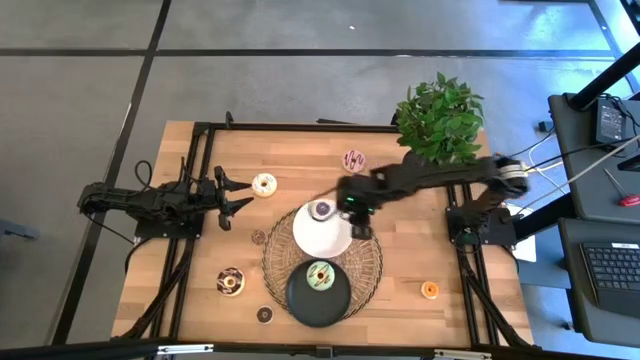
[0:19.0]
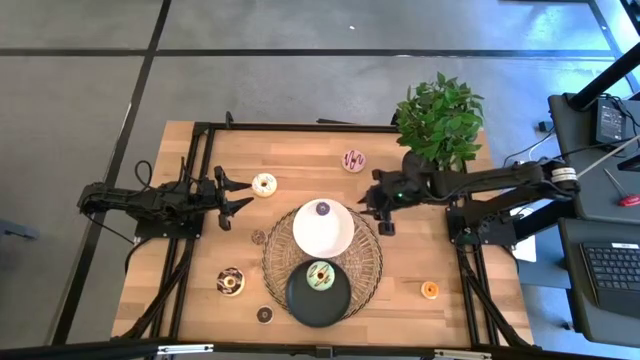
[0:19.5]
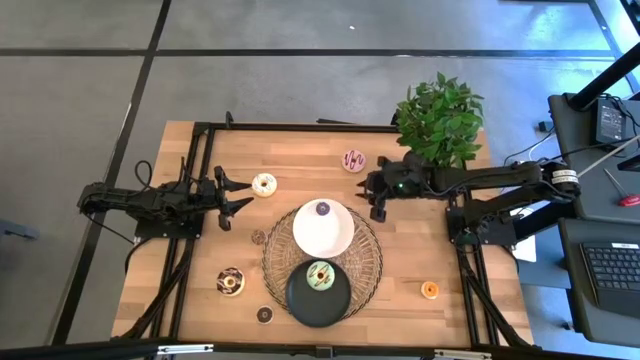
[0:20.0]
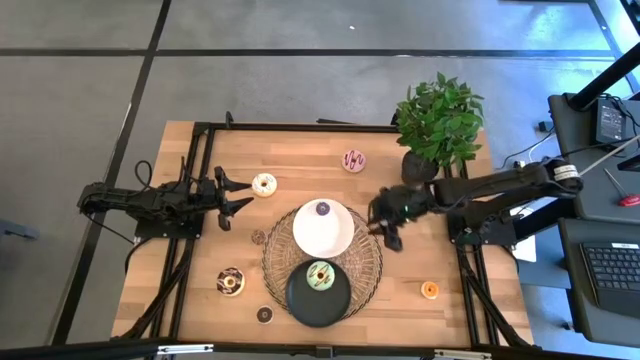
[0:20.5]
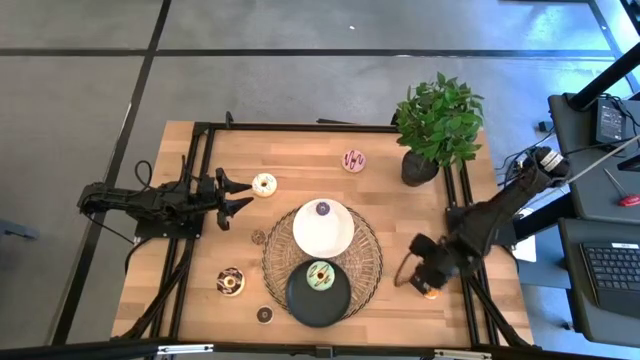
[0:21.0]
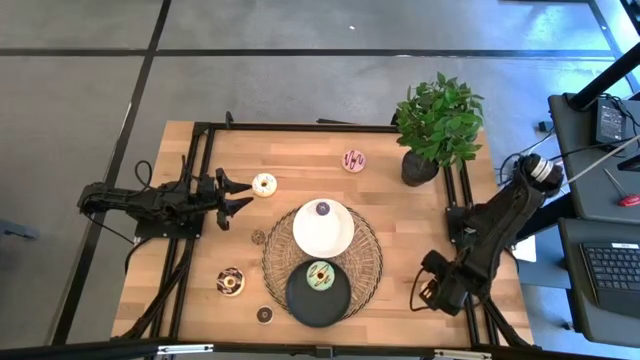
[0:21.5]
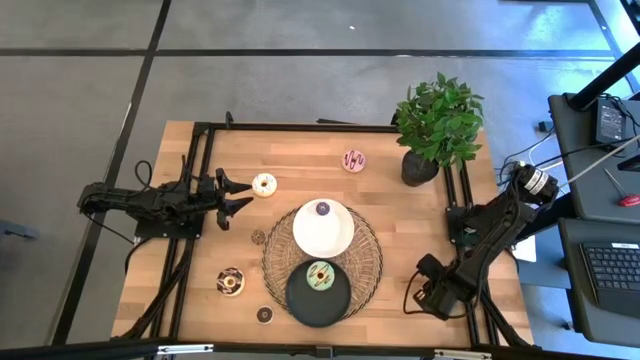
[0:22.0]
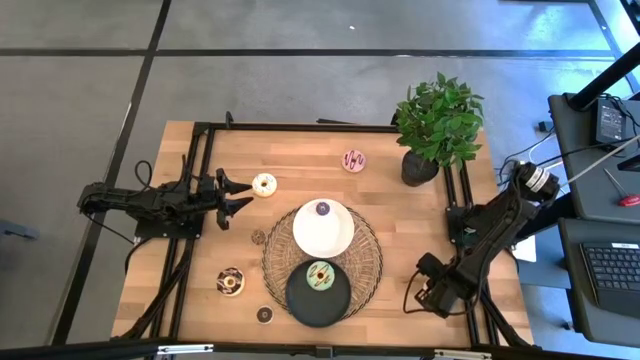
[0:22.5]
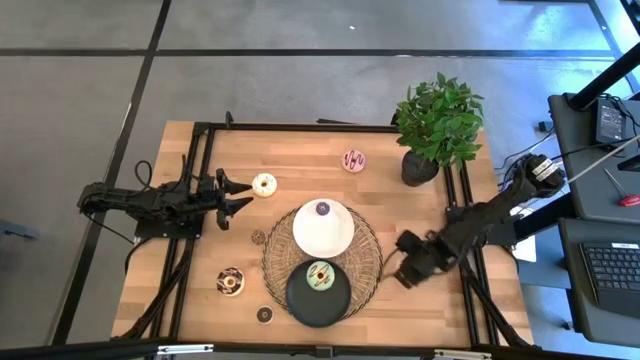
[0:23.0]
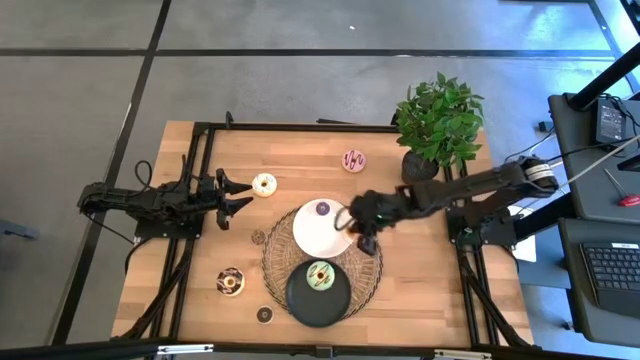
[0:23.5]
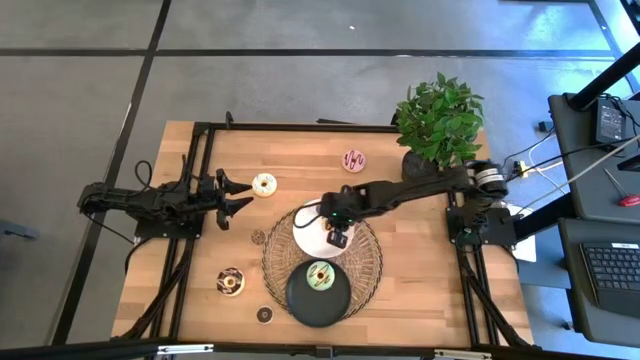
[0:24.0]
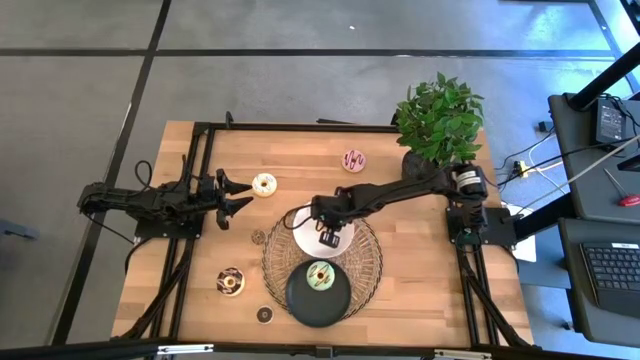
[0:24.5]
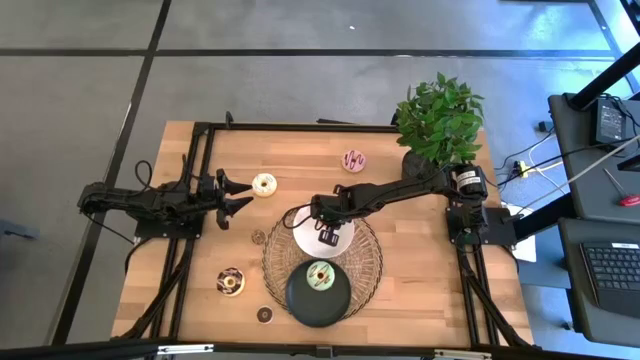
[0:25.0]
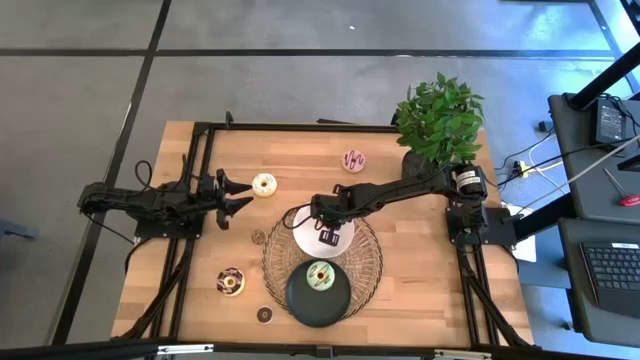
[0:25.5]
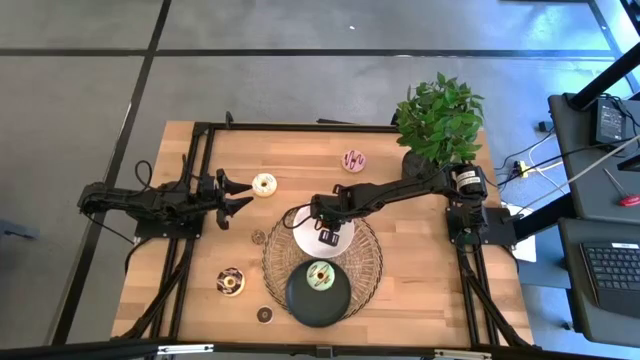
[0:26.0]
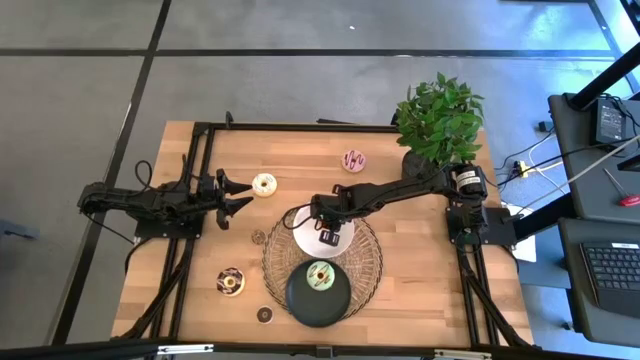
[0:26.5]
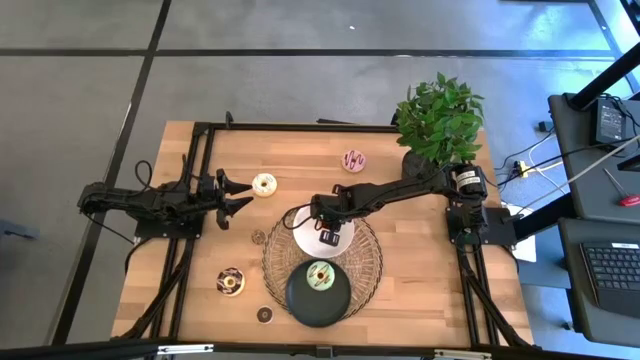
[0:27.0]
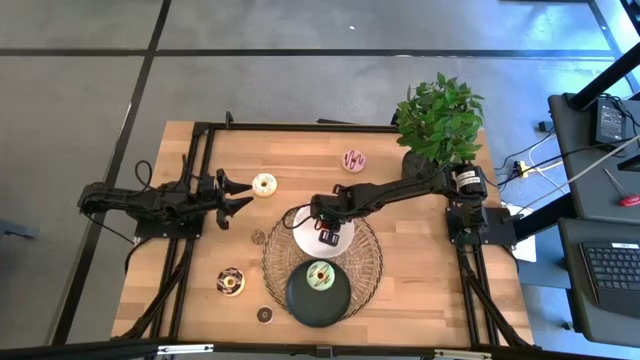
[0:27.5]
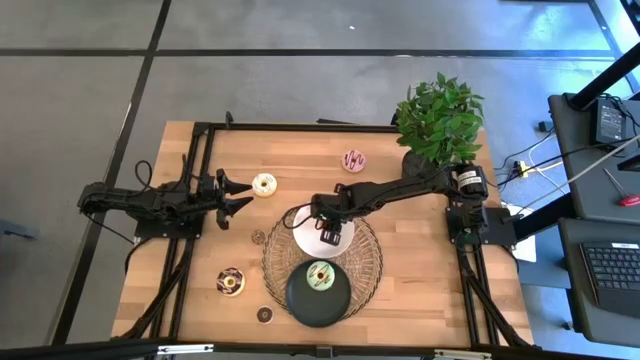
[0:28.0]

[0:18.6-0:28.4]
Task: Pick & Place donuts
Put the small yellow doughnut on the white plate

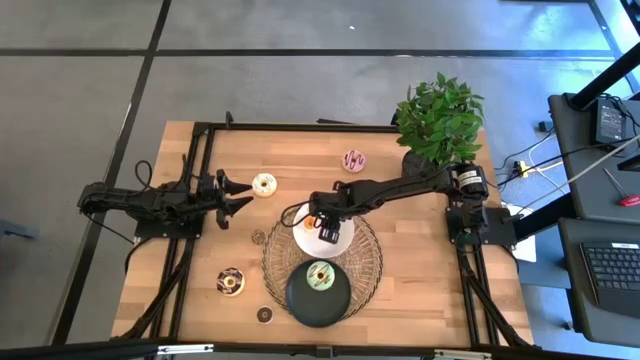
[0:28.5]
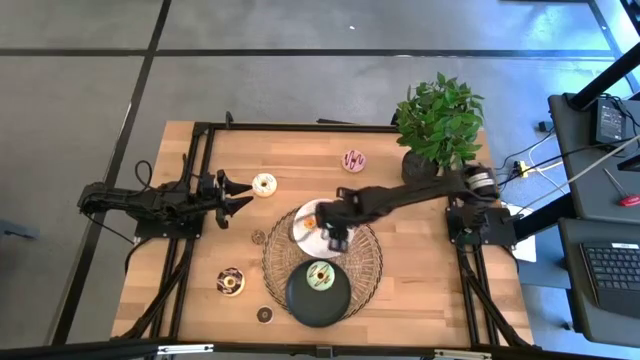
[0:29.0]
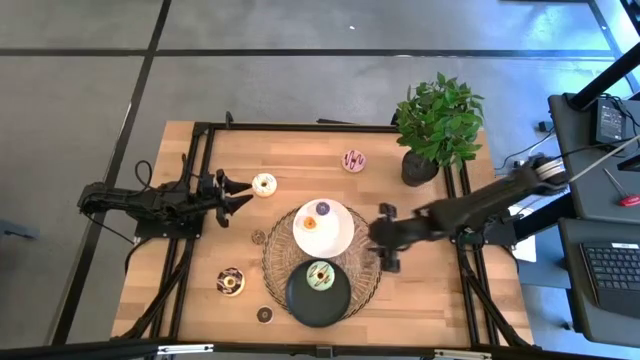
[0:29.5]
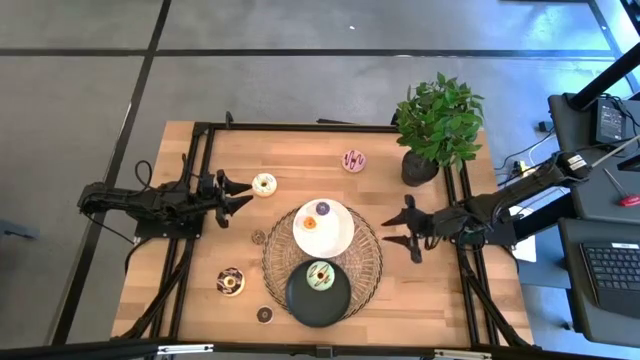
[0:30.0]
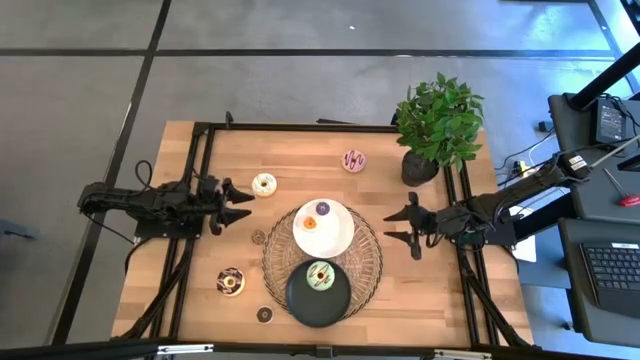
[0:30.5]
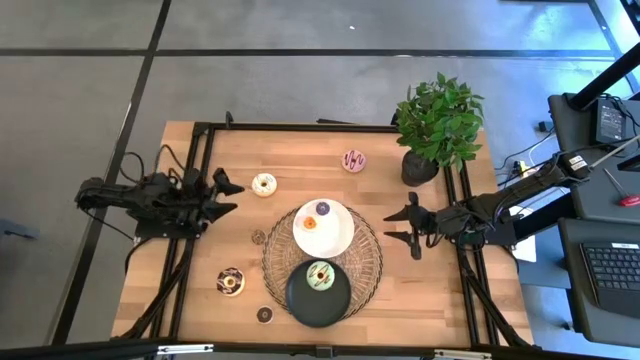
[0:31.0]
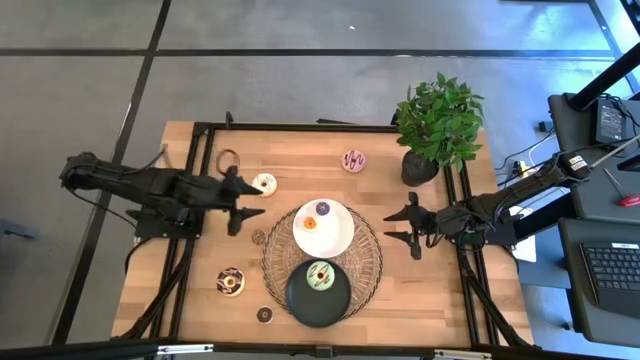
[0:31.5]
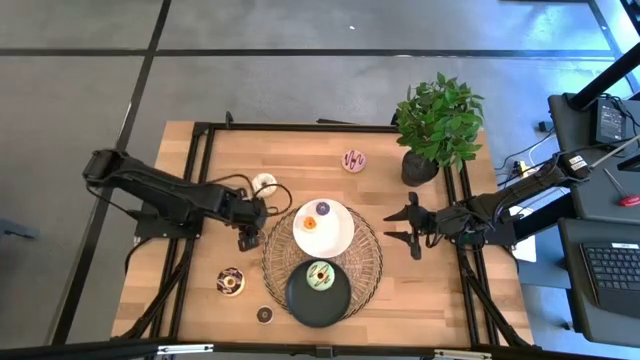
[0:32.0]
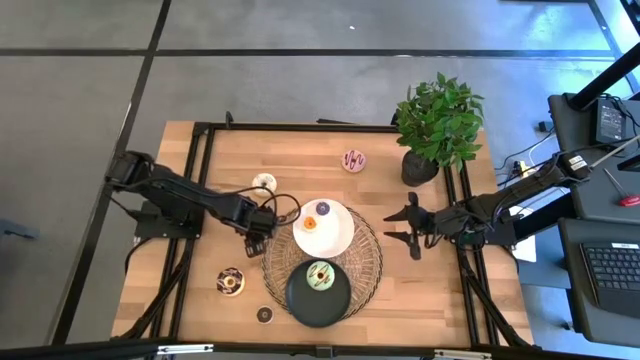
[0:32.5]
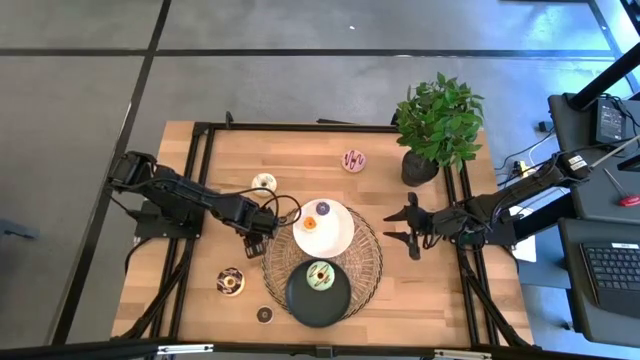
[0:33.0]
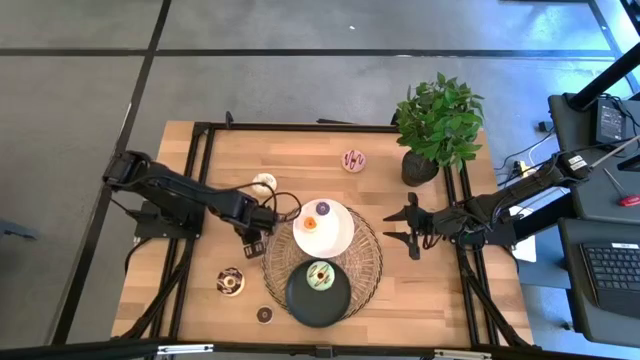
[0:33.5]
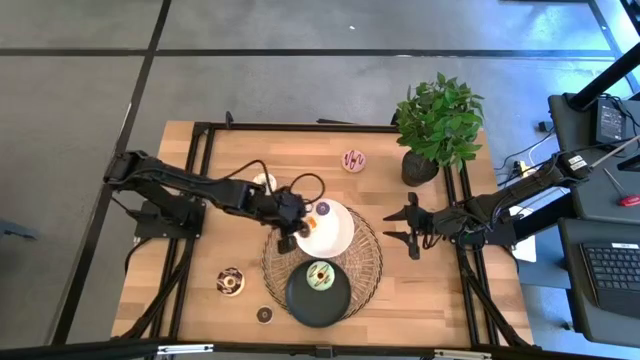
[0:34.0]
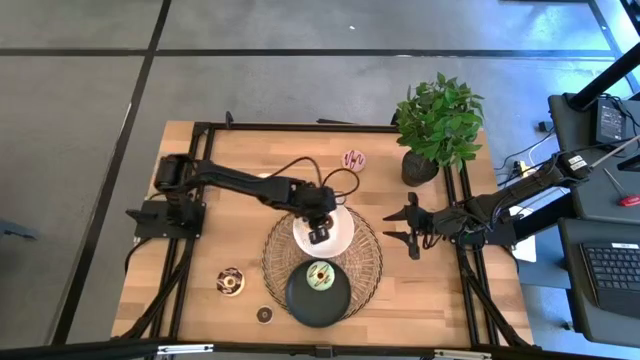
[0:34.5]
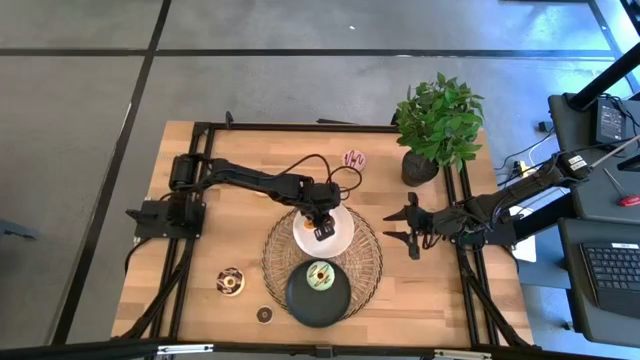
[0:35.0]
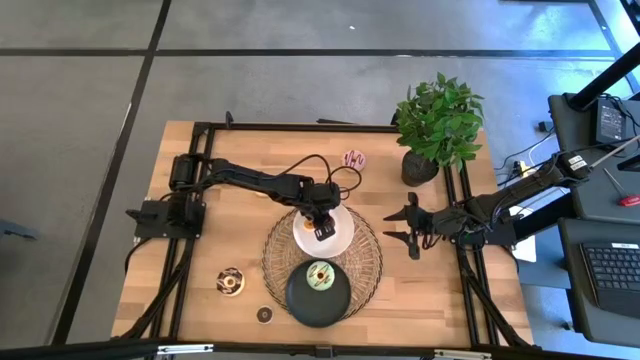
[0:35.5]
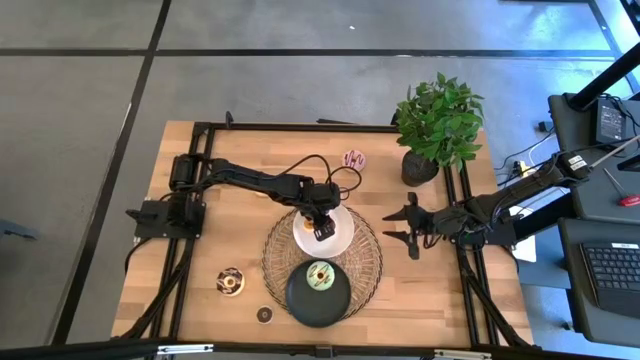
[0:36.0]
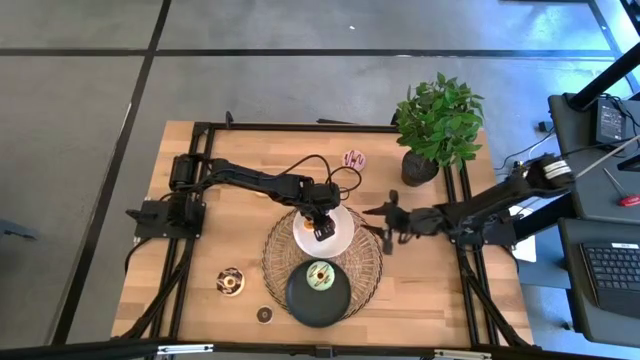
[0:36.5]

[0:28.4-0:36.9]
Put the small brown doughnut on the white plate
